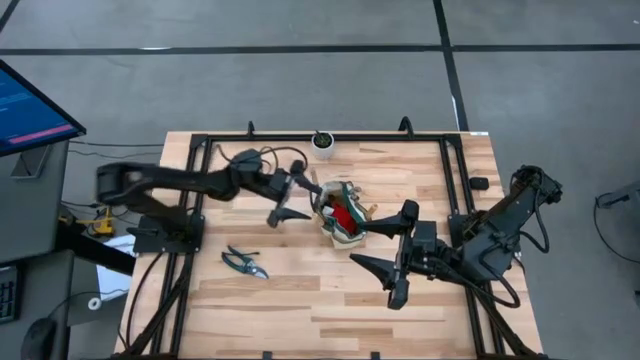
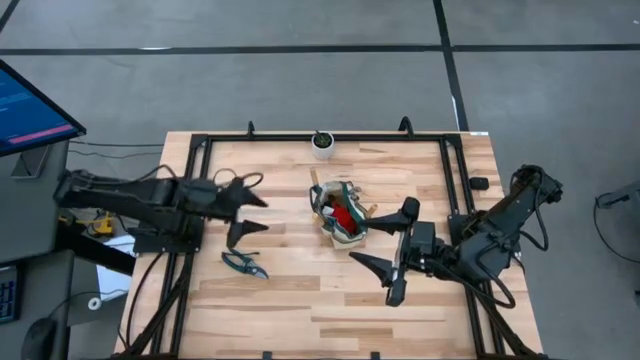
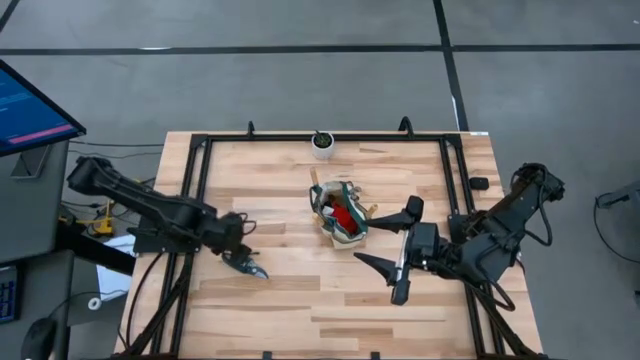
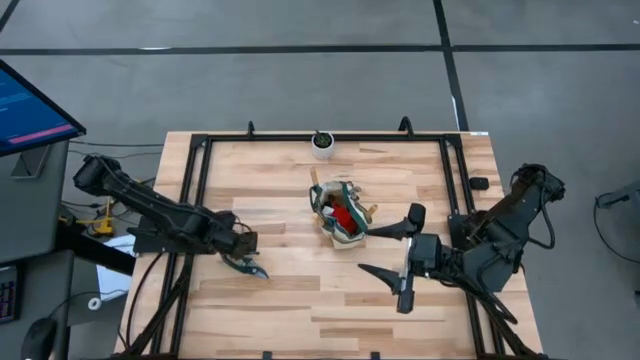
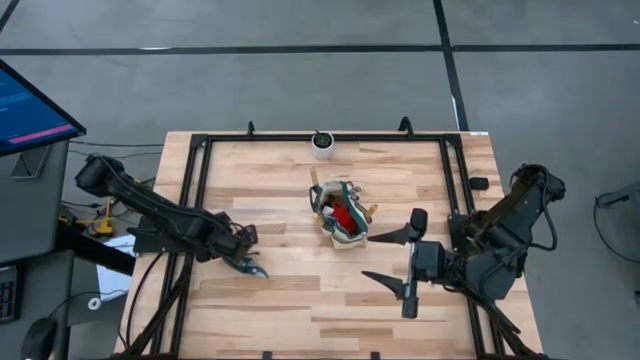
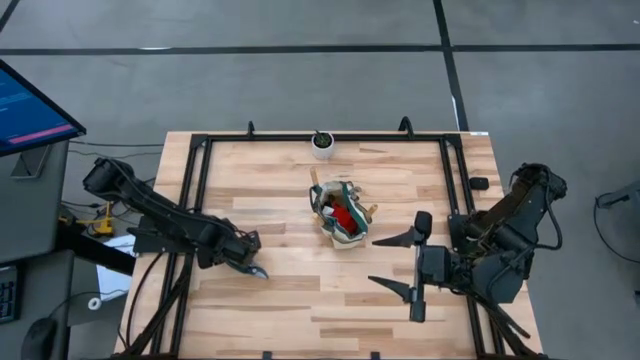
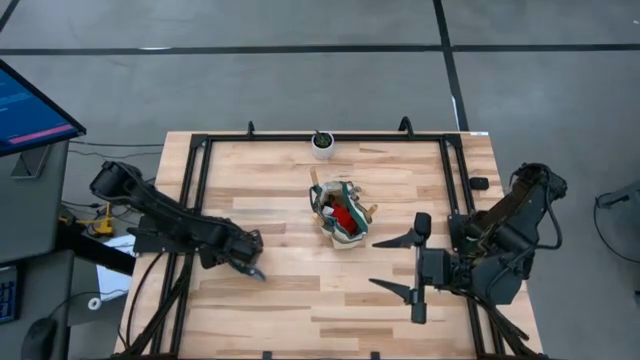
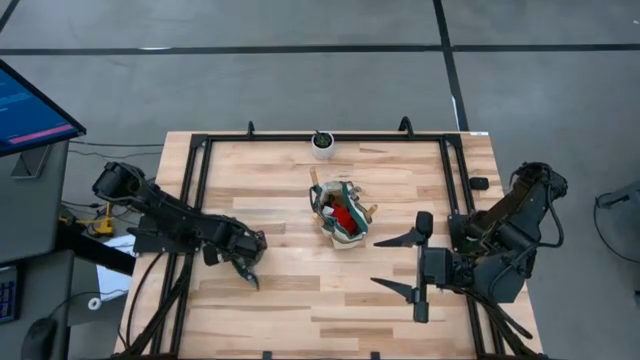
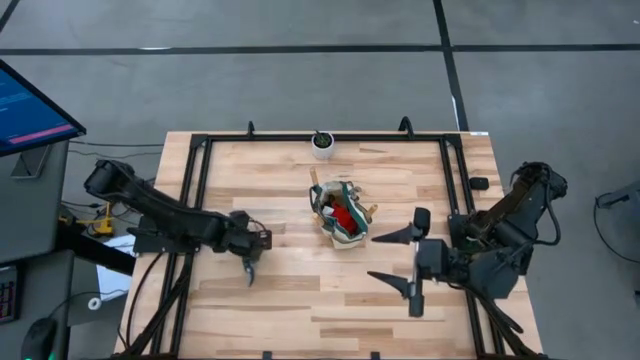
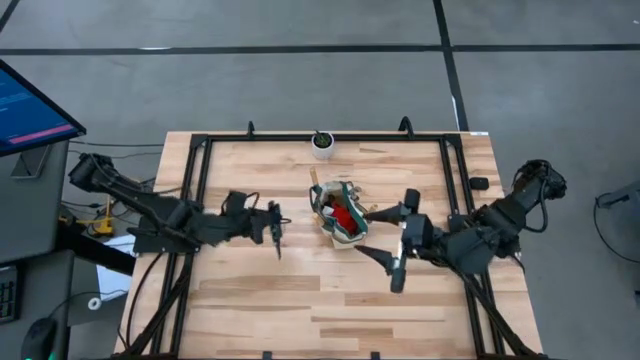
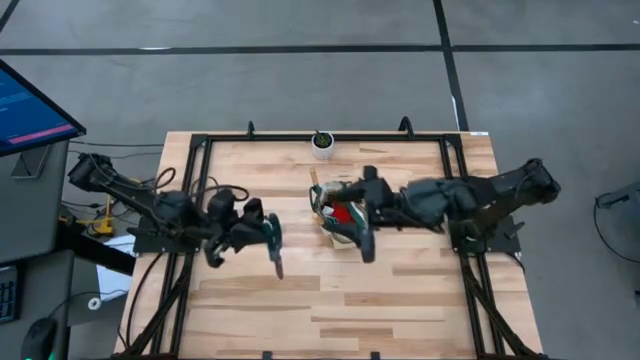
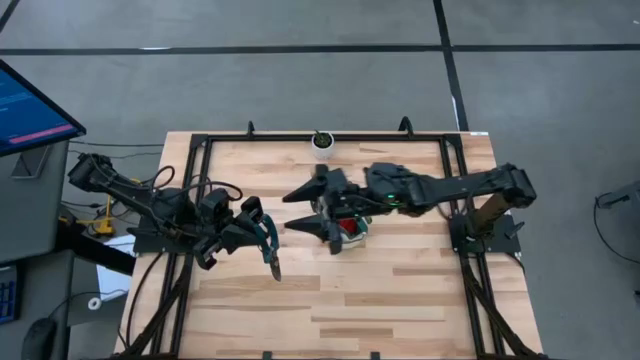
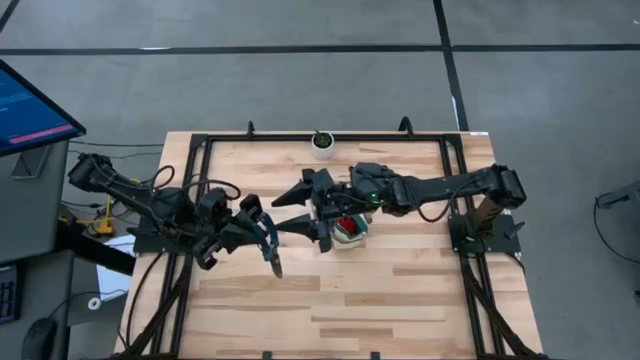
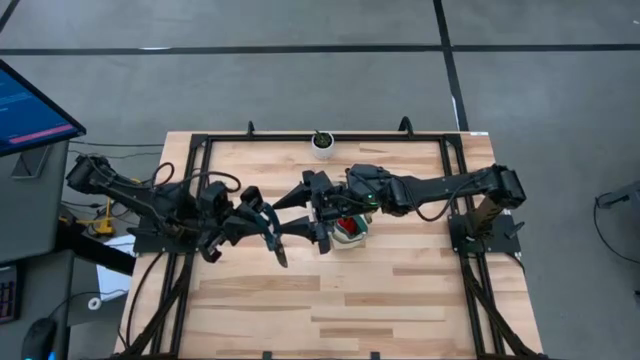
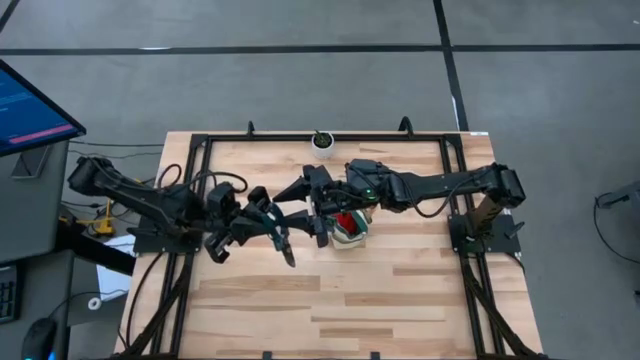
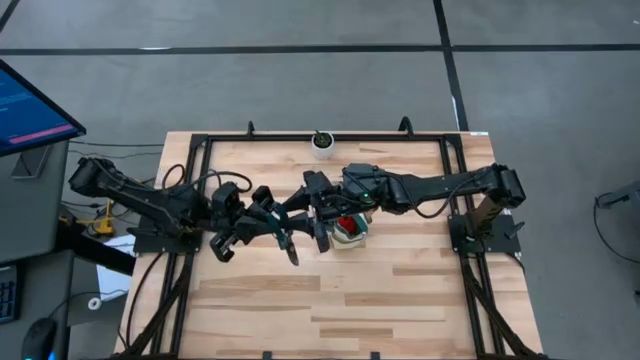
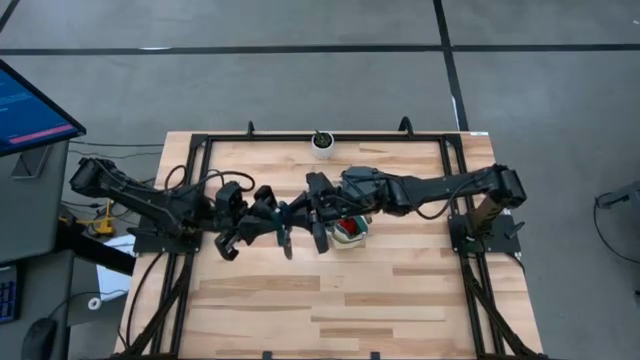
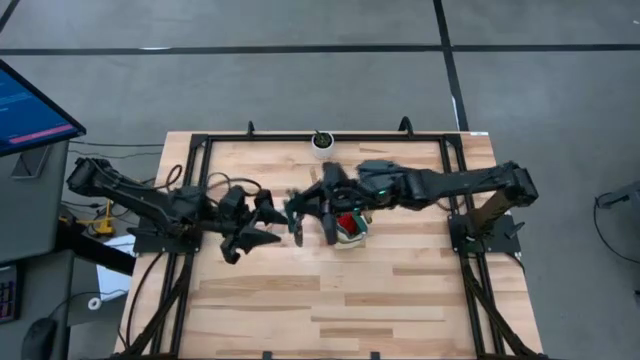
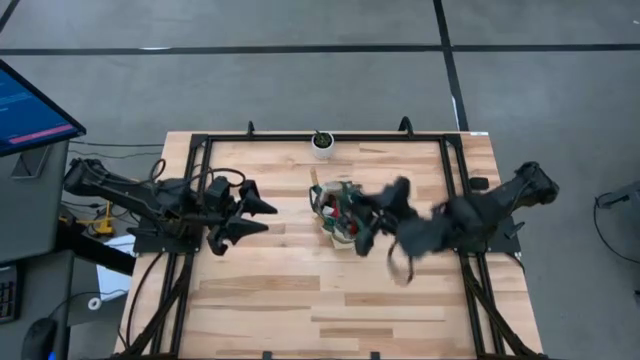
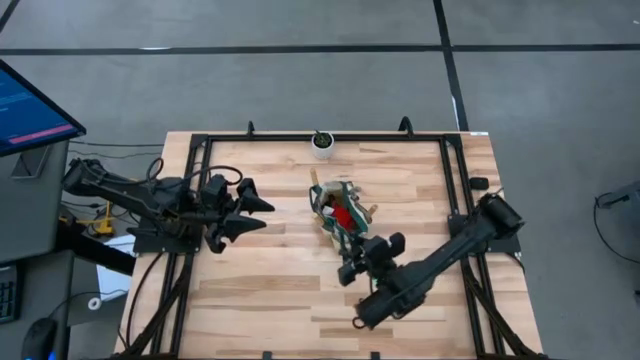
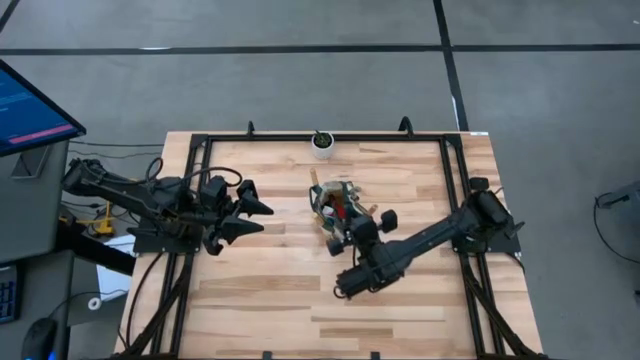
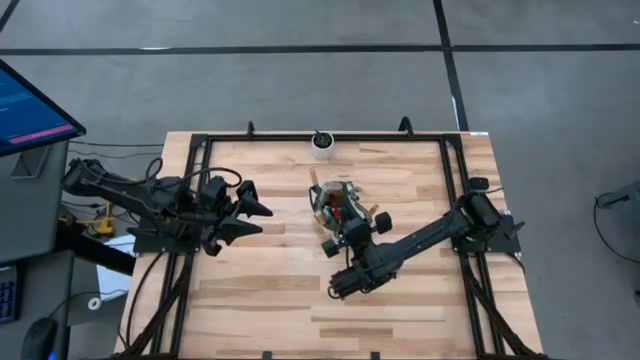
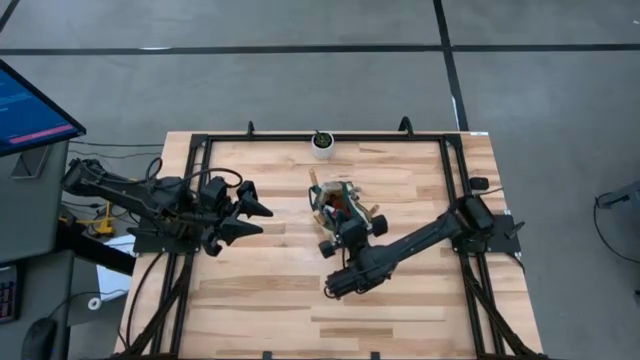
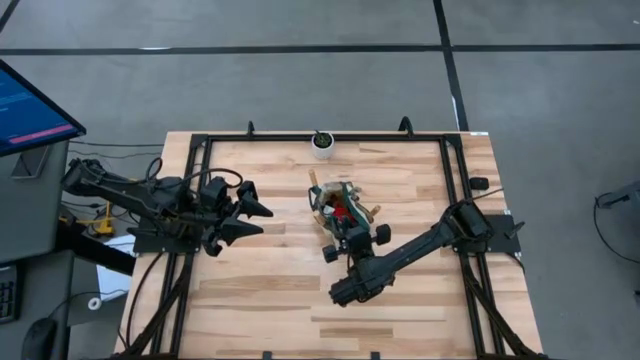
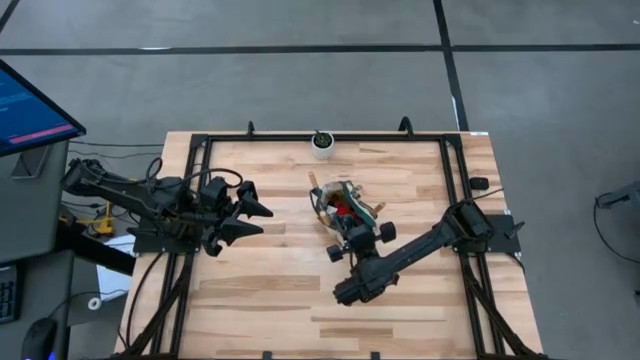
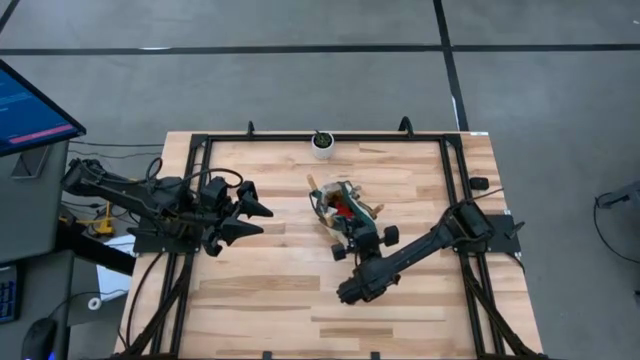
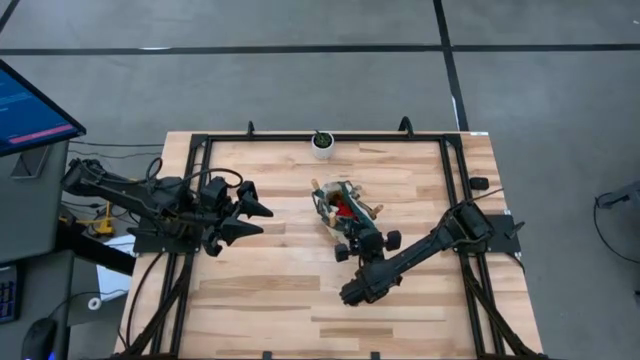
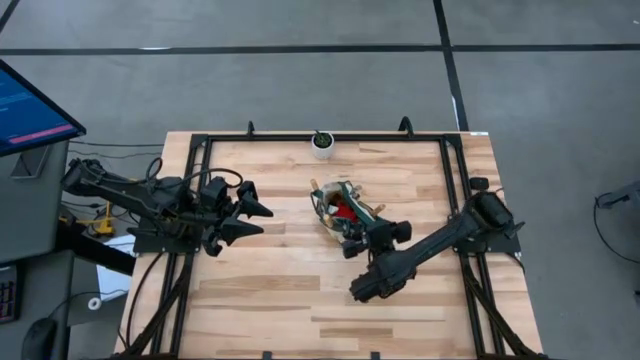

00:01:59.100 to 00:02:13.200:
Task: Pick & Place Garden tools in Gardening bag
Put the black shear scissors into the green gardening bag

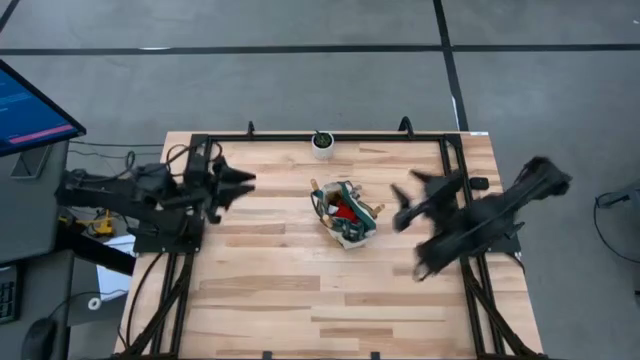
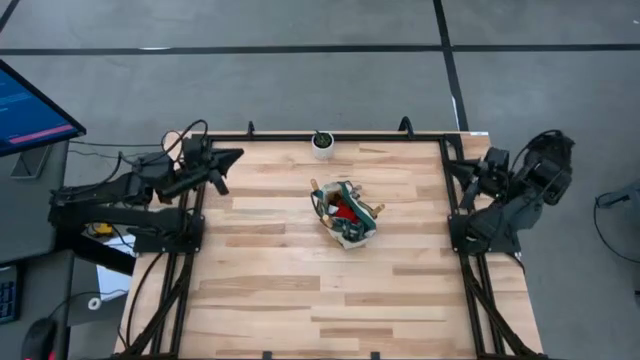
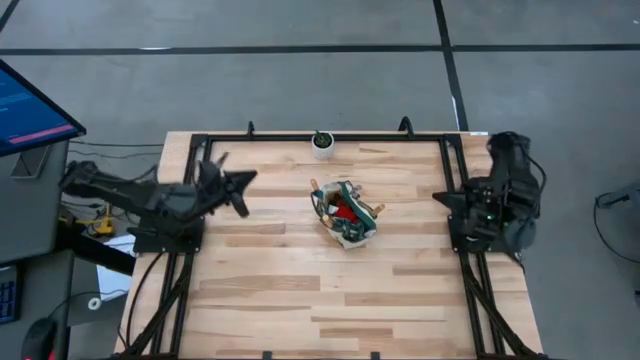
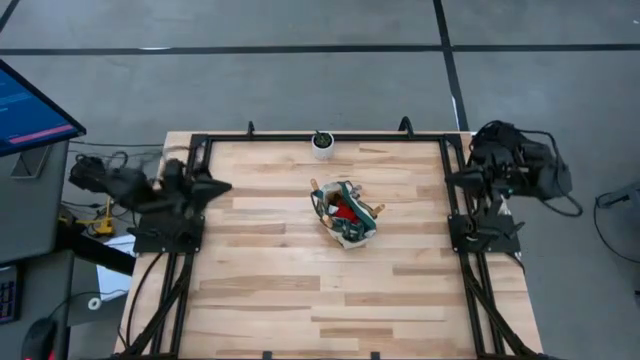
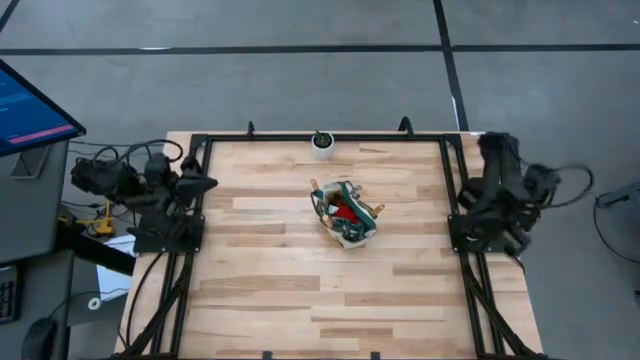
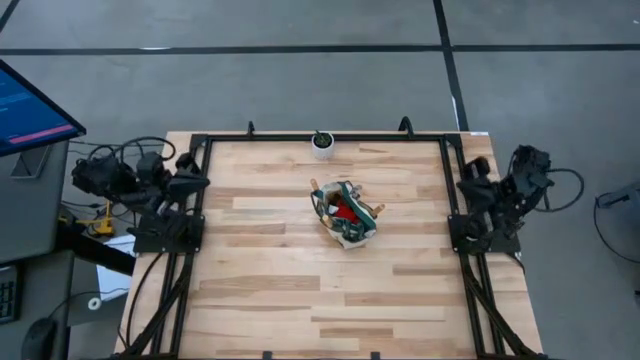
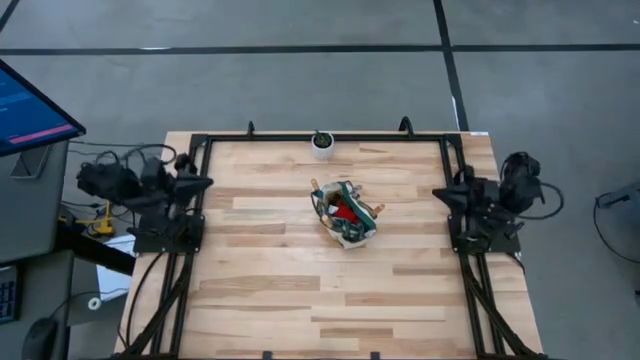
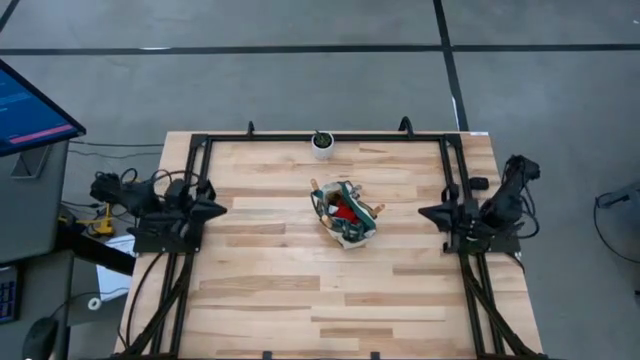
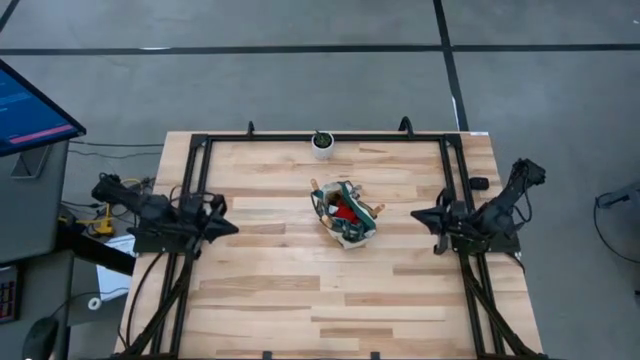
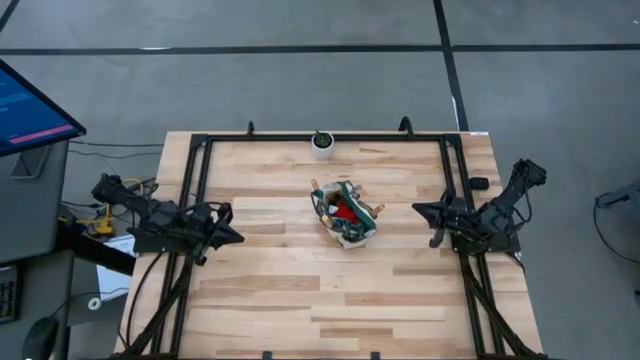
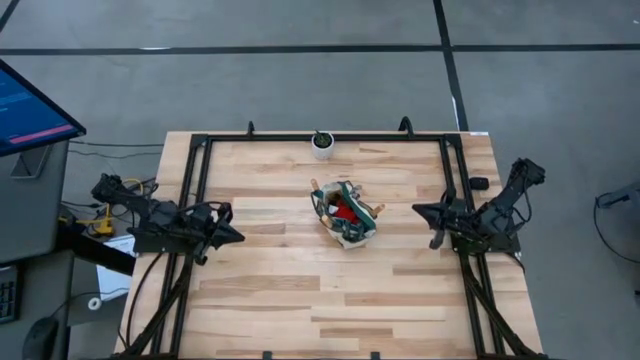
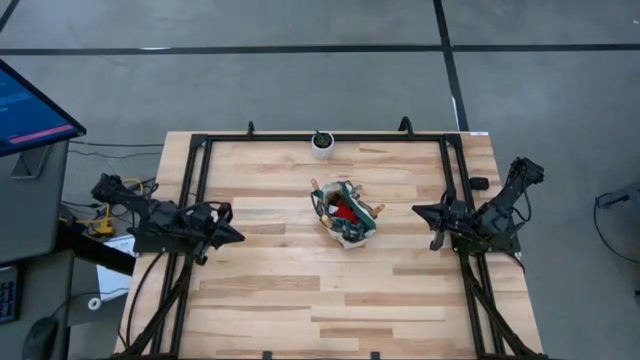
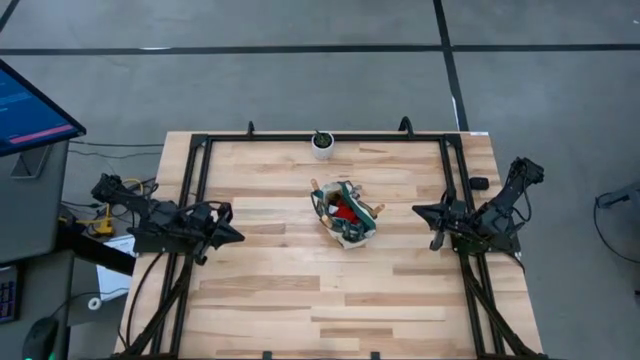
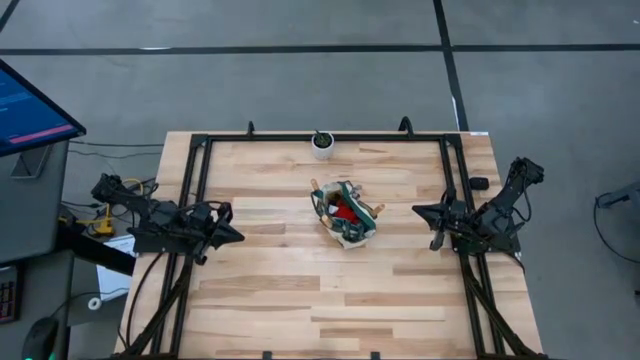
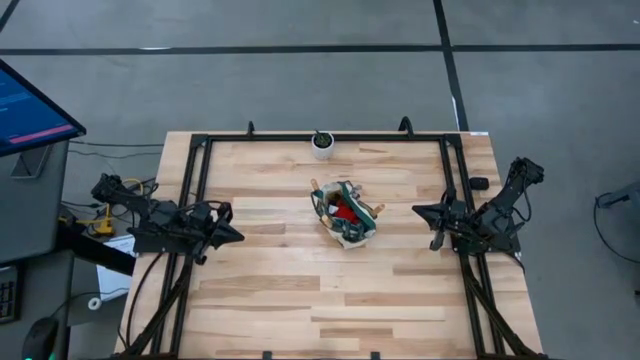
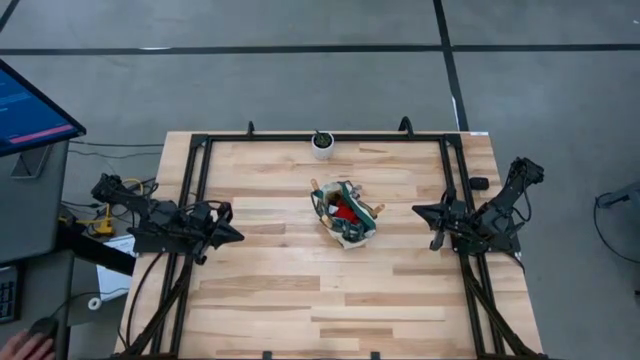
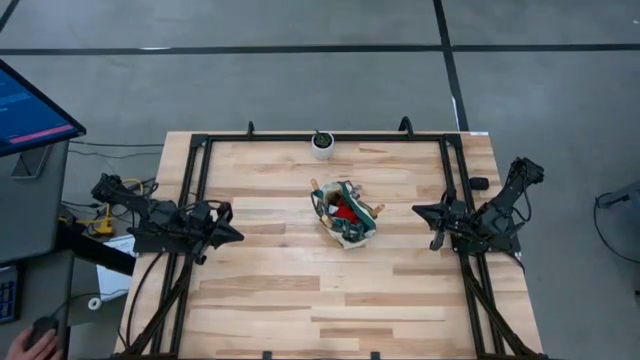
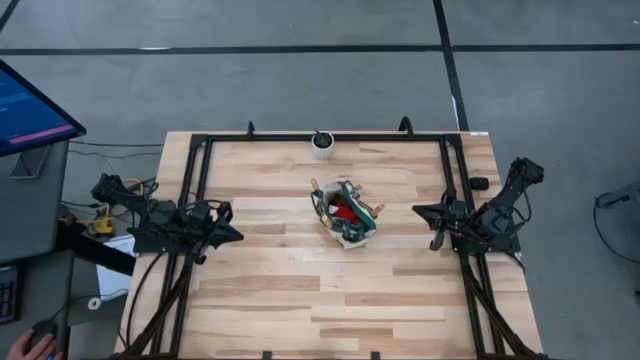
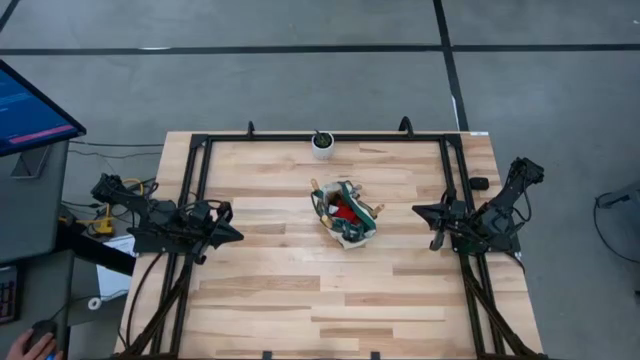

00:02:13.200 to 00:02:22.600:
Return to Home Position
